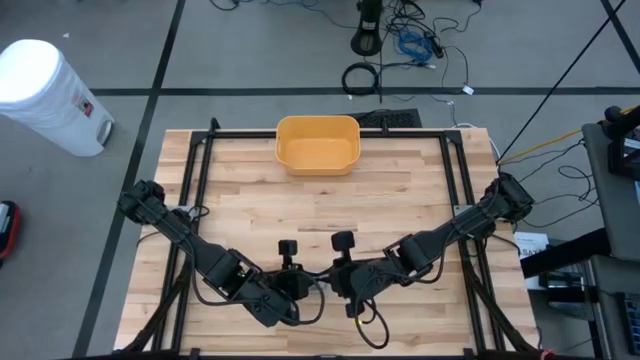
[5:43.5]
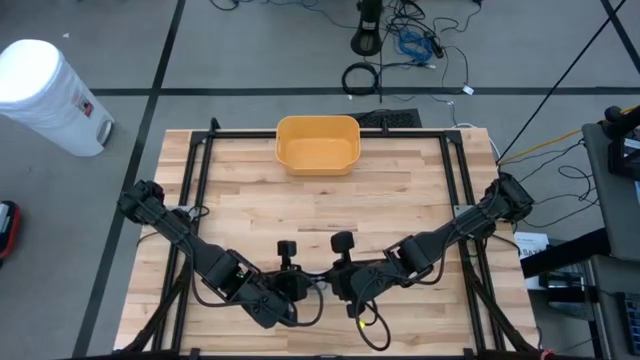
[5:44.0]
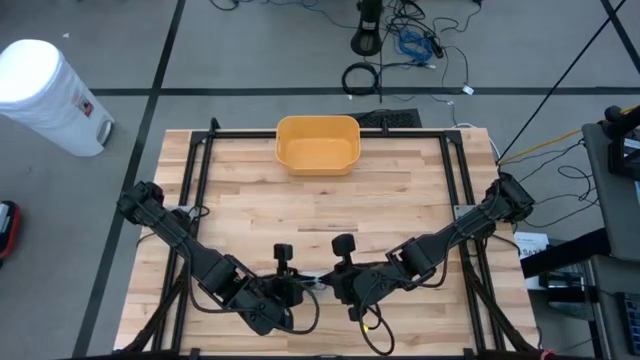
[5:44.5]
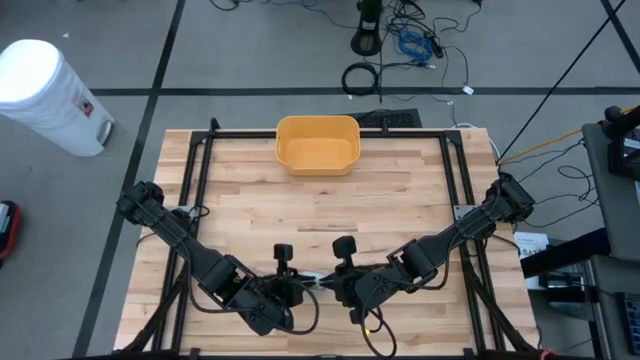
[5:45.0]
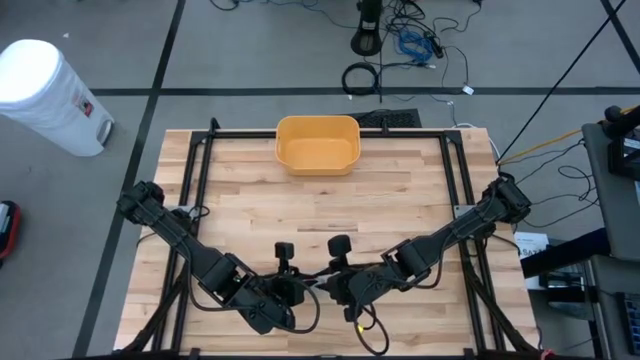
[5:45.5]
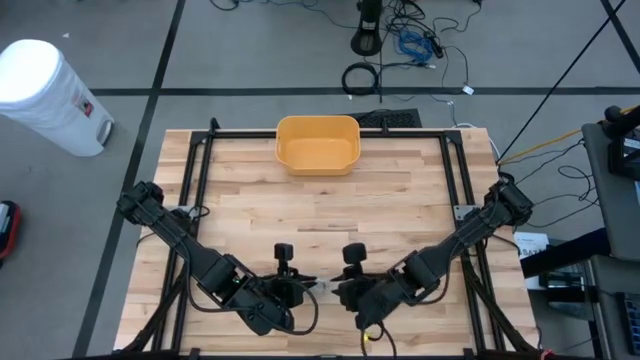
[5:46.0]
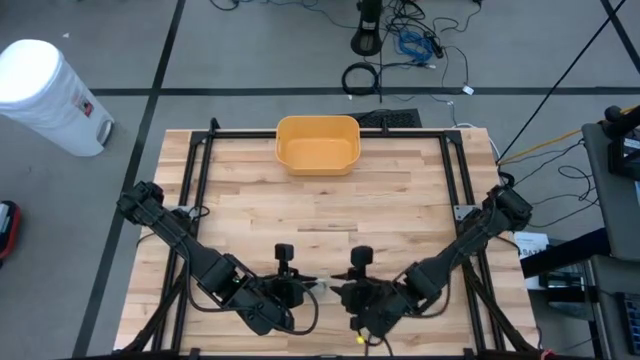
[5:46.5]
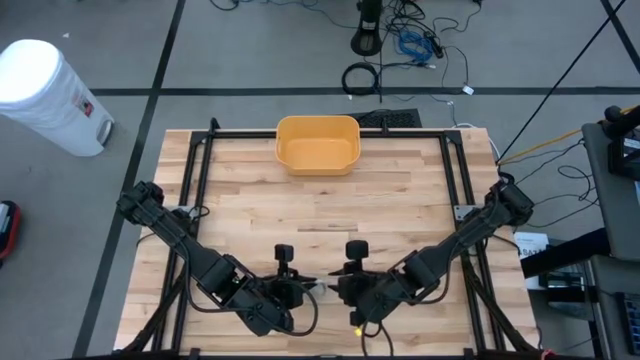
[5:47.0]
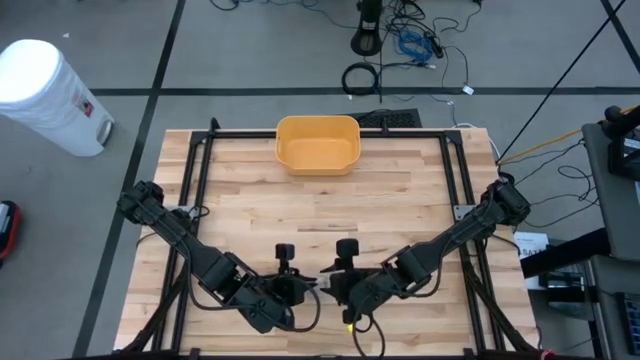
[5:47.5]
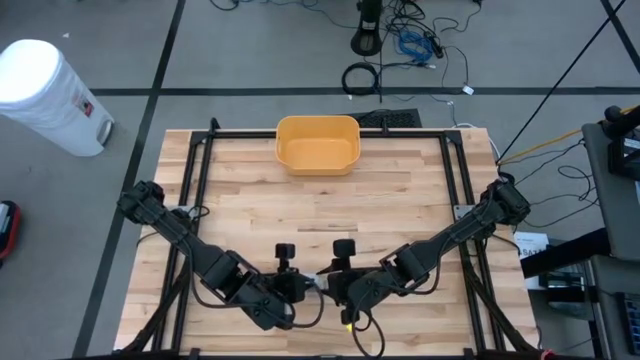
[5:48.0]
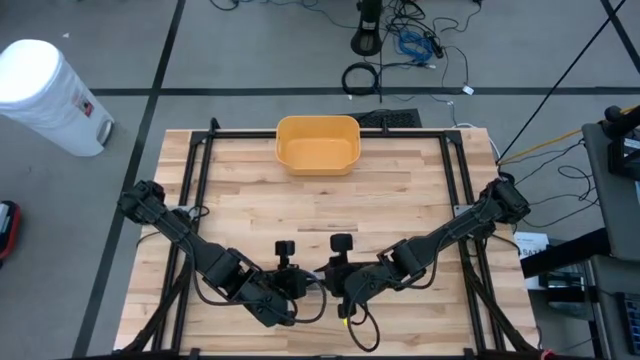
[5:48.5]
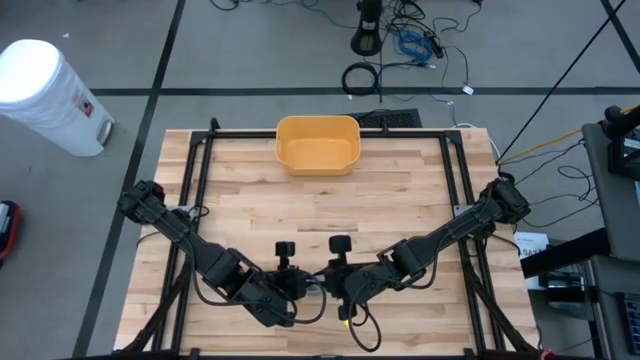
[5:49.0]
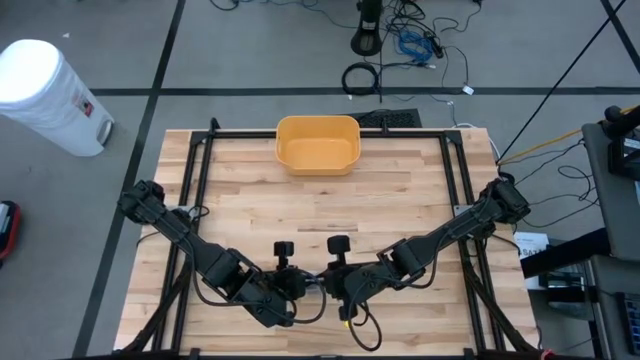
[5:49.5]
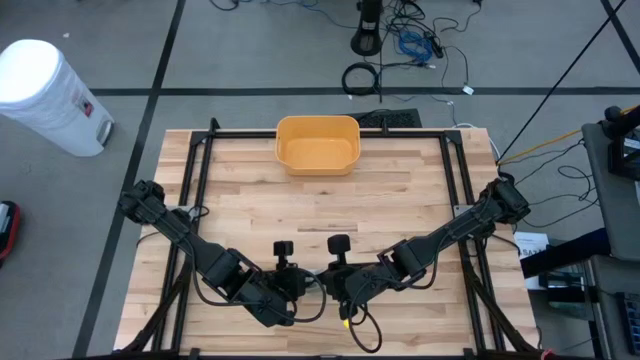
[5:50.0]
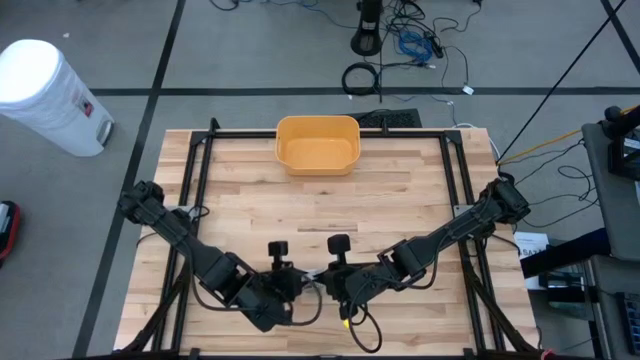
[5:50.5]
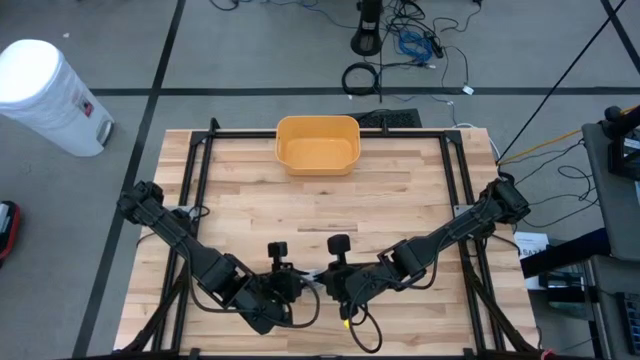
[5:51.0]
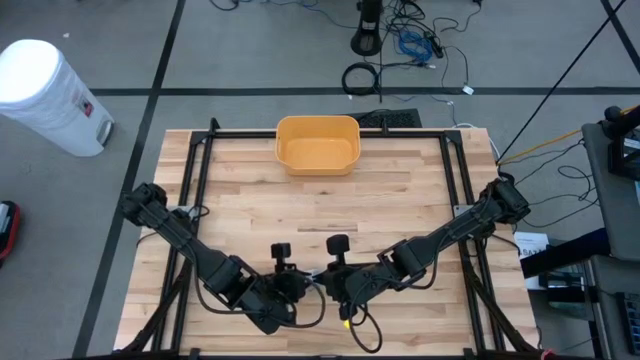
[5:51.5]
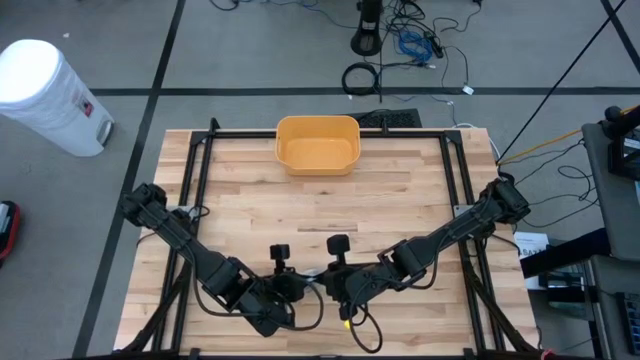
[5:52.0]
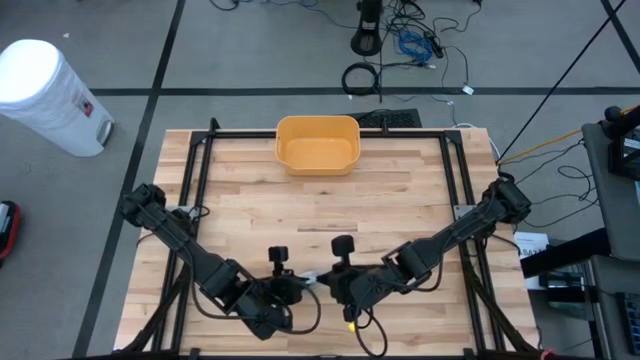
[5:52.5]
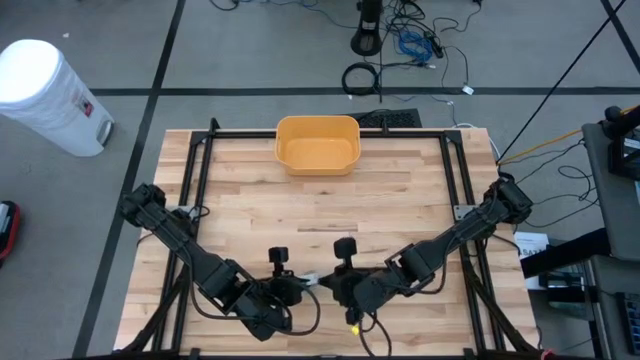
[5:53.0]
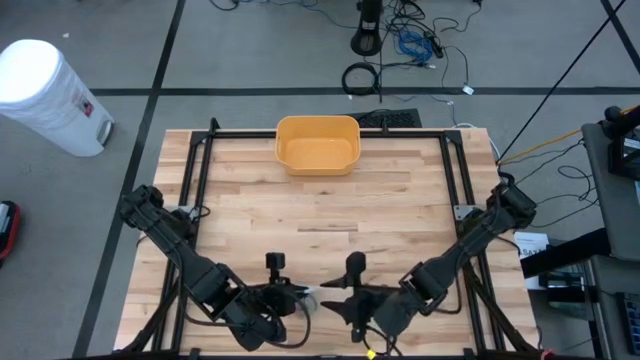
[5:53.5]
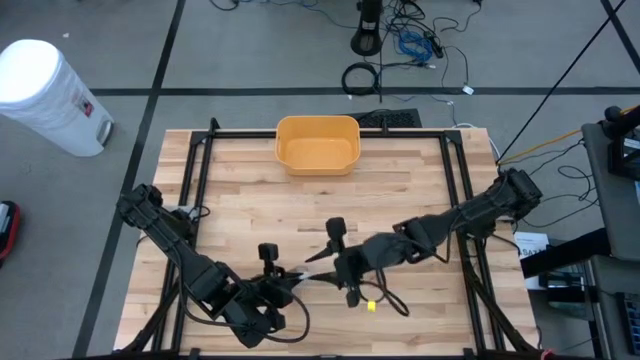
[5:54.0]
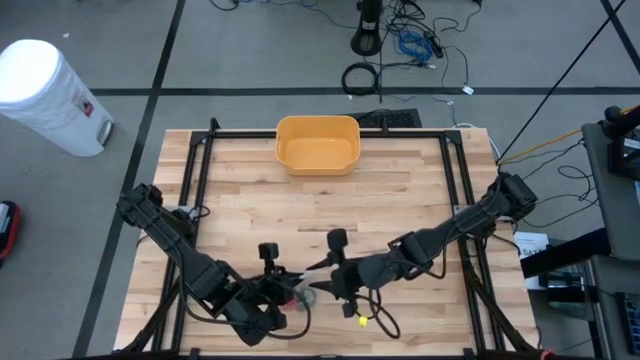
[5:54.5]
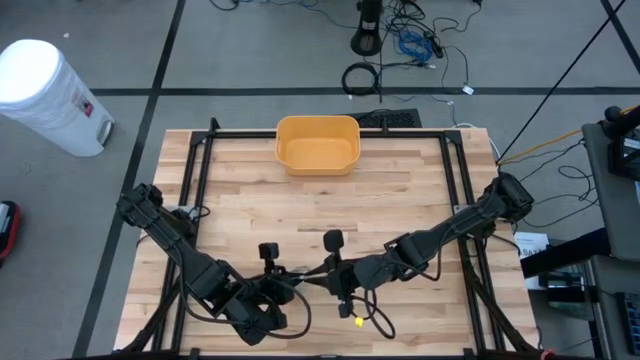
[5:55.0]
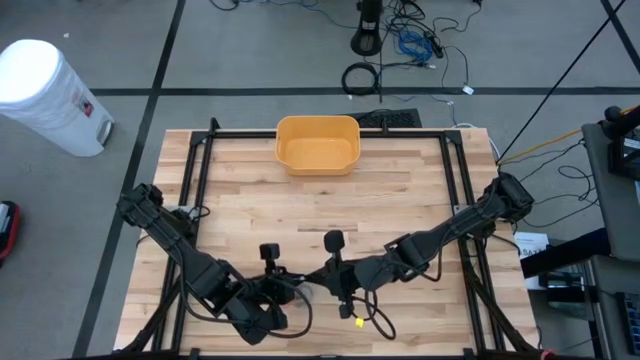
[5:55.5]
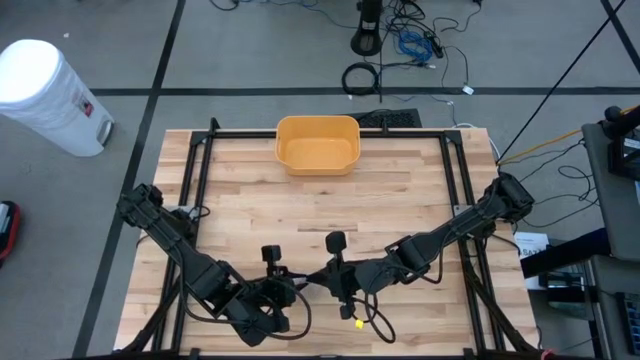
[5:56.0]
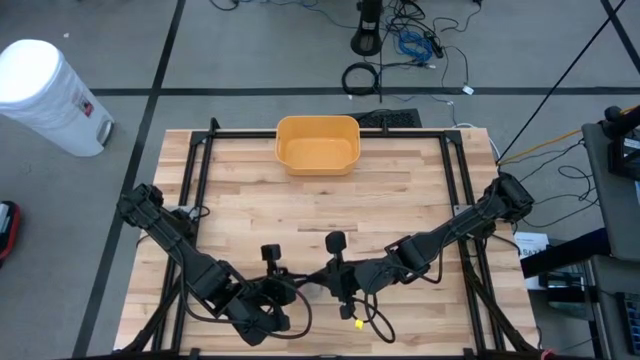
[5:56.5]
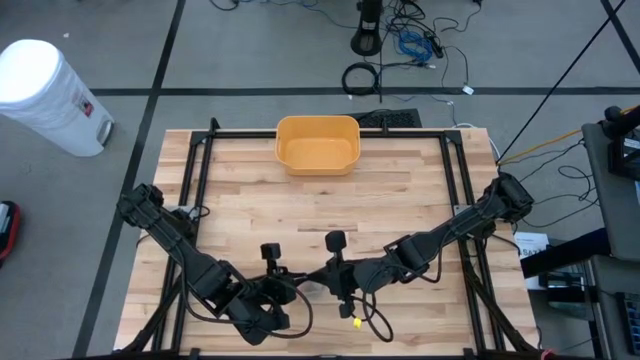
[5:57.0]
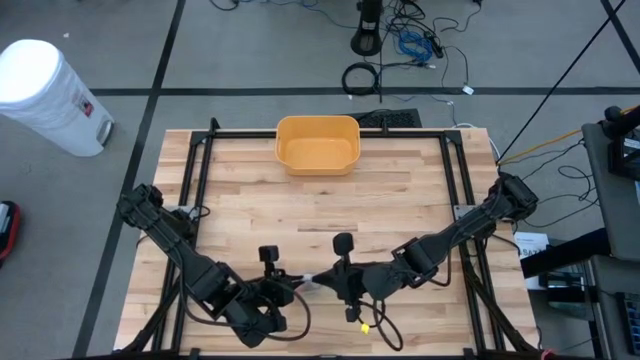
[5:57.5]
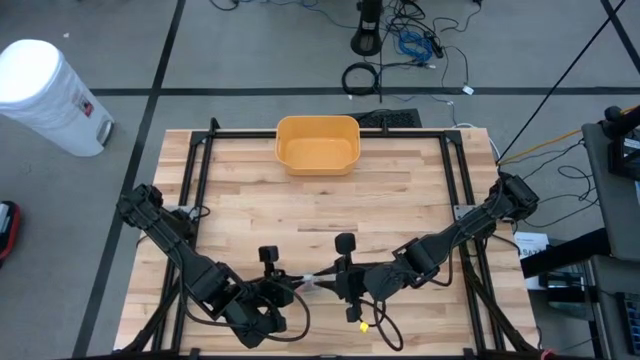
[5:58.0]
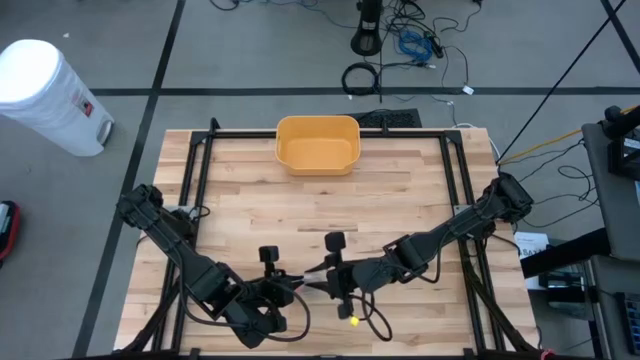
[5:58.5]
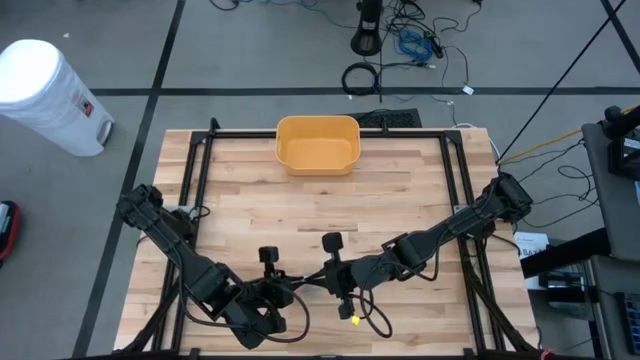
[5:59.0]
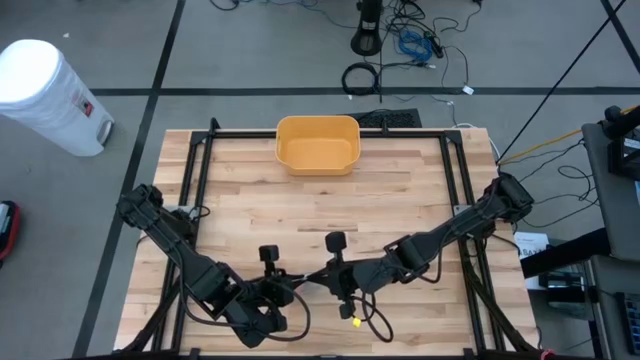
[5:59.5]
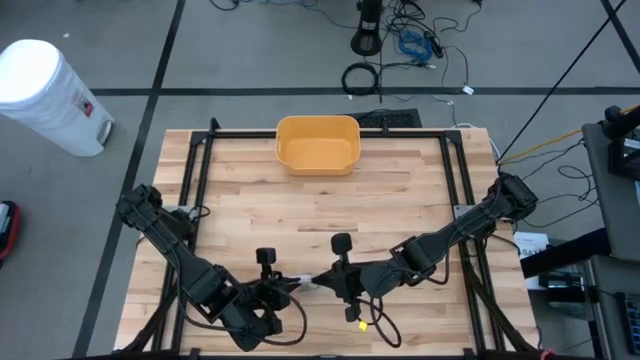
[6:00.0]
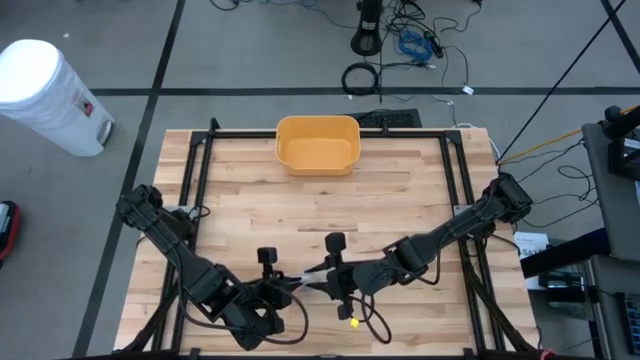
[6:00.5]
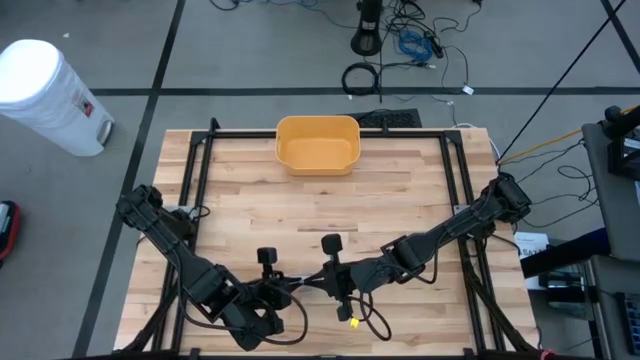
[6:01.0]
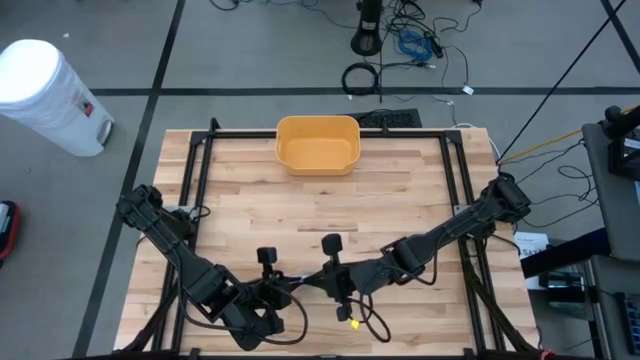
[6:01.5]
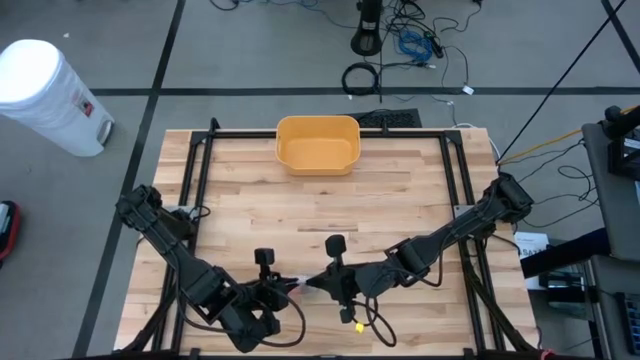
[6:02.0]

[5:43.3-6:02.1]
Task: Roll bandage
Close the transparent zip bag
